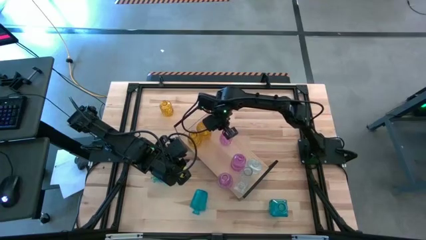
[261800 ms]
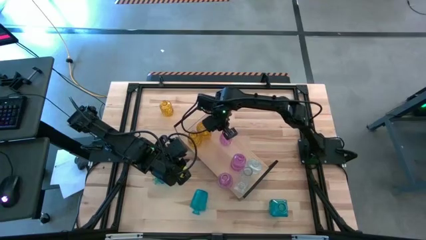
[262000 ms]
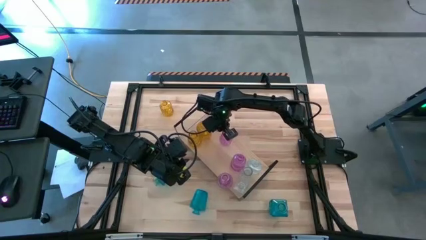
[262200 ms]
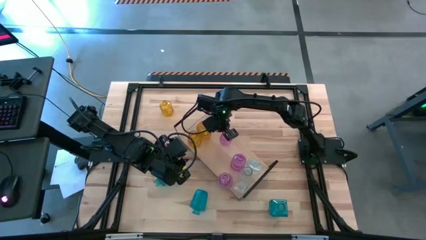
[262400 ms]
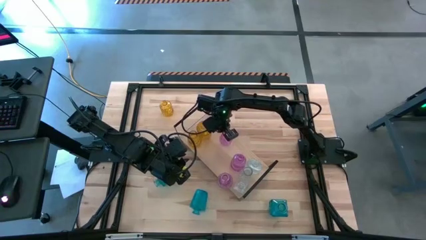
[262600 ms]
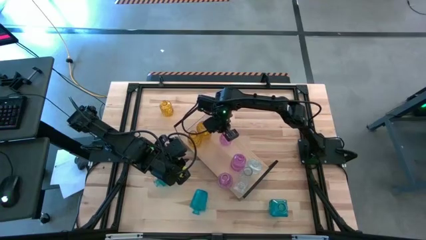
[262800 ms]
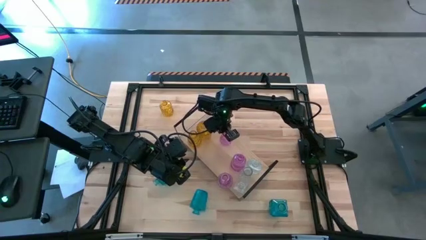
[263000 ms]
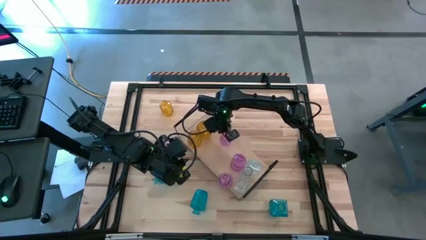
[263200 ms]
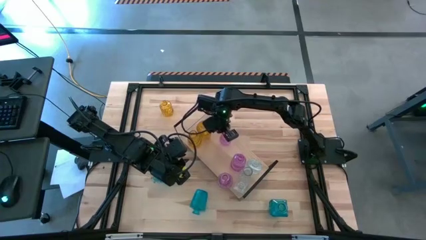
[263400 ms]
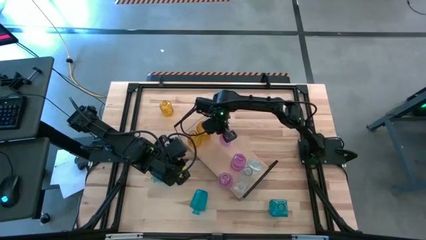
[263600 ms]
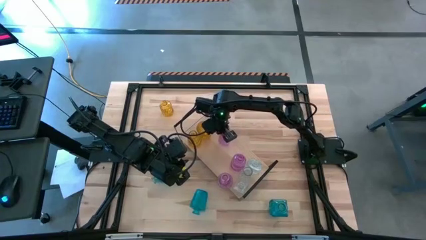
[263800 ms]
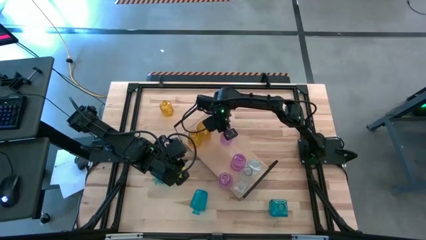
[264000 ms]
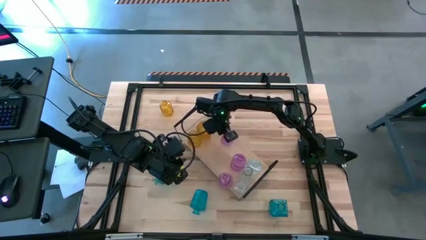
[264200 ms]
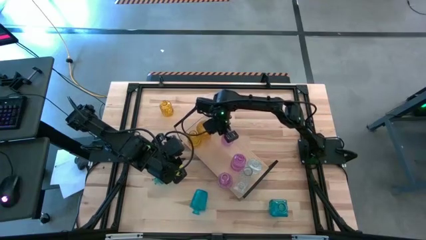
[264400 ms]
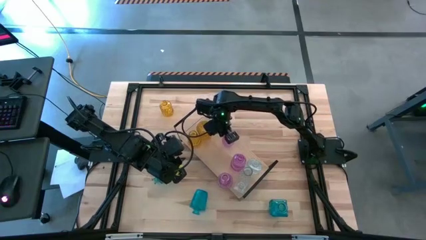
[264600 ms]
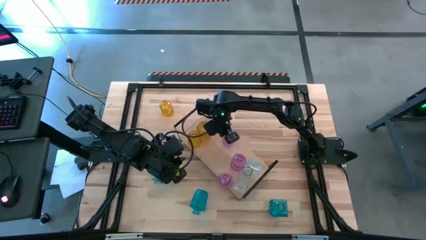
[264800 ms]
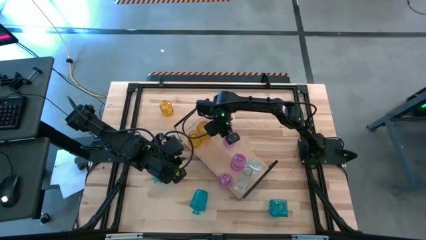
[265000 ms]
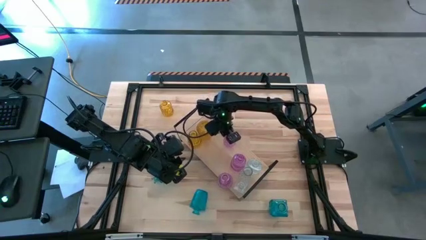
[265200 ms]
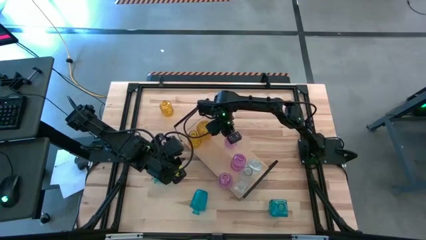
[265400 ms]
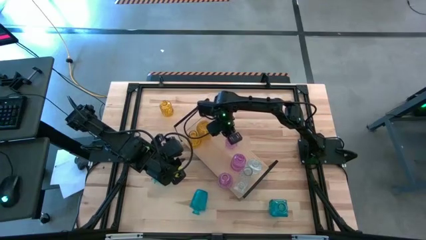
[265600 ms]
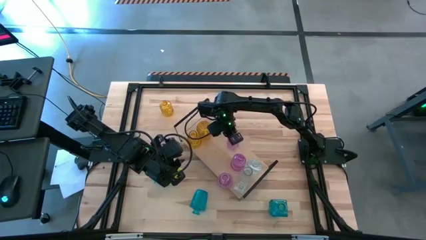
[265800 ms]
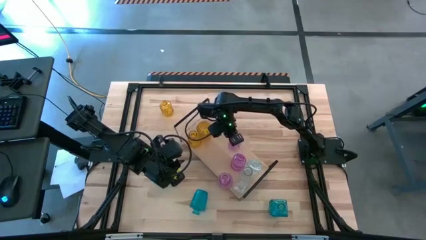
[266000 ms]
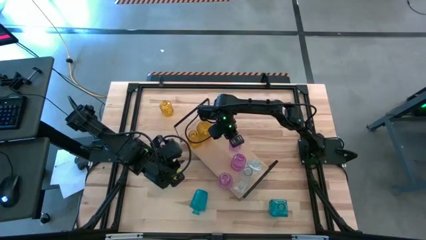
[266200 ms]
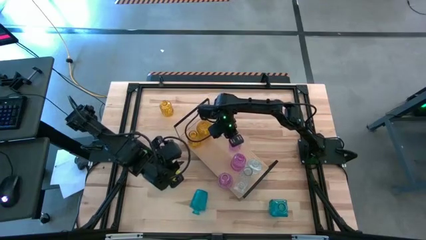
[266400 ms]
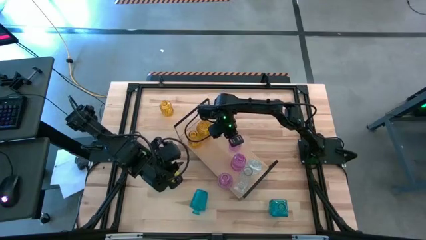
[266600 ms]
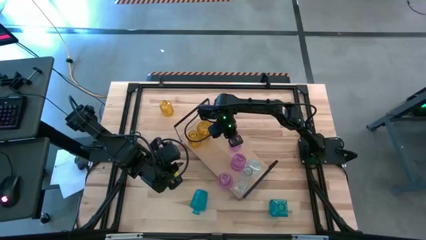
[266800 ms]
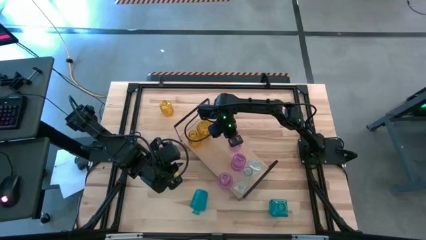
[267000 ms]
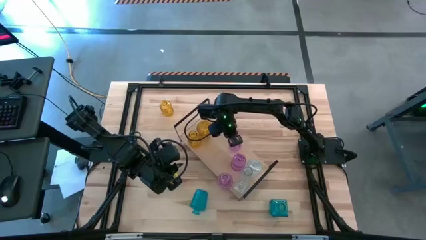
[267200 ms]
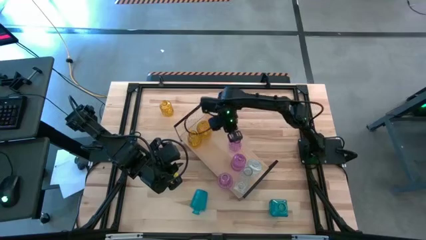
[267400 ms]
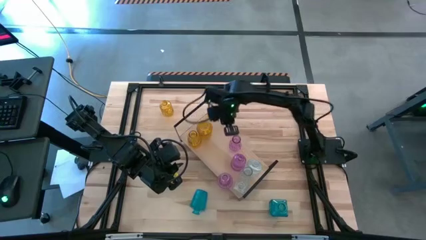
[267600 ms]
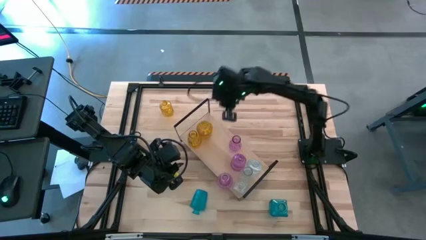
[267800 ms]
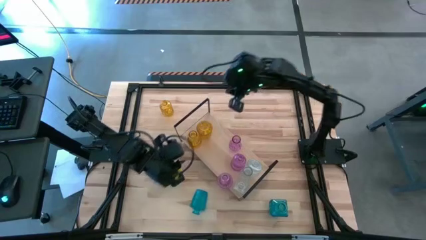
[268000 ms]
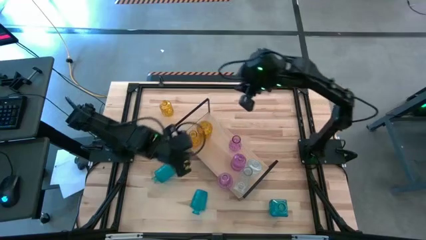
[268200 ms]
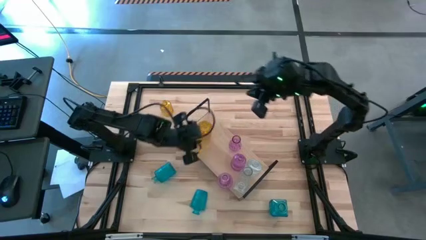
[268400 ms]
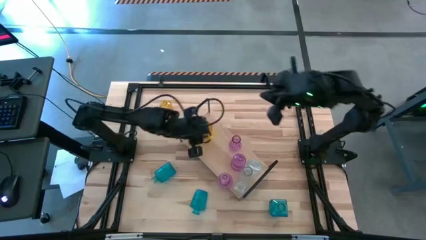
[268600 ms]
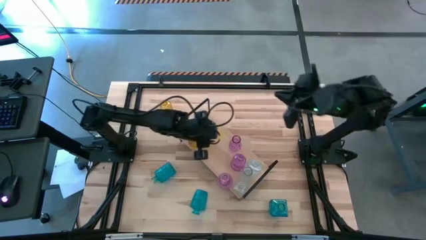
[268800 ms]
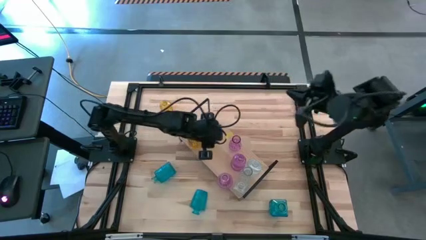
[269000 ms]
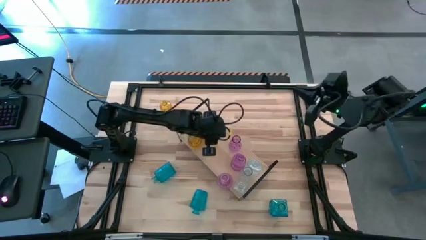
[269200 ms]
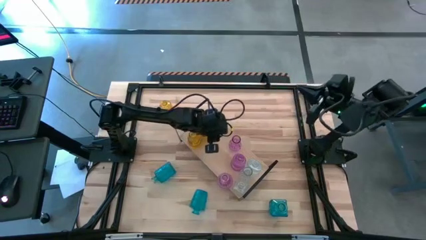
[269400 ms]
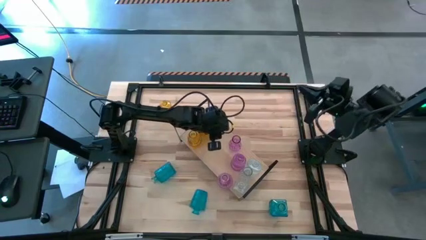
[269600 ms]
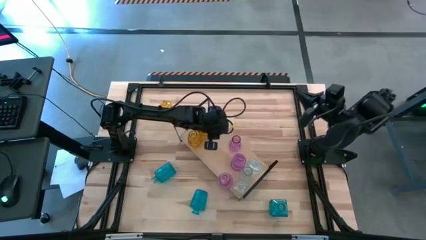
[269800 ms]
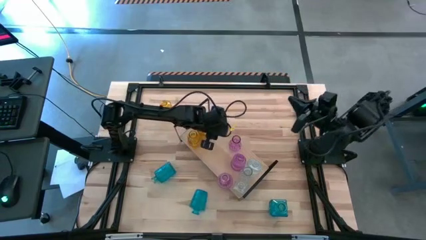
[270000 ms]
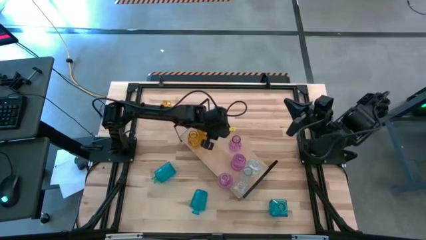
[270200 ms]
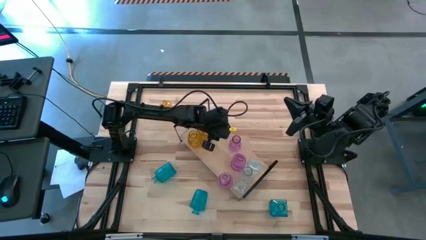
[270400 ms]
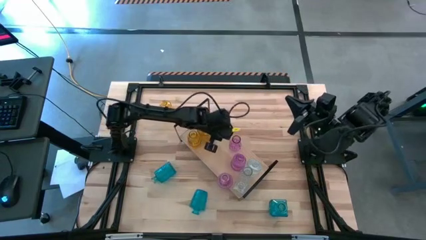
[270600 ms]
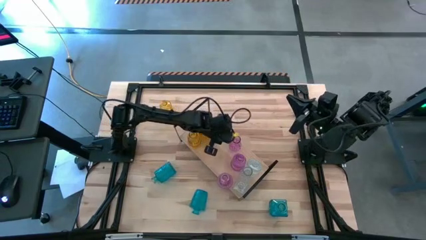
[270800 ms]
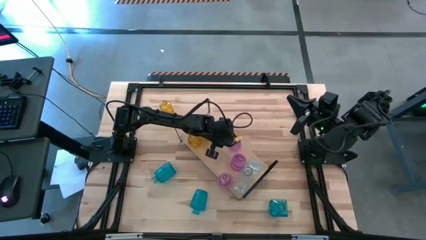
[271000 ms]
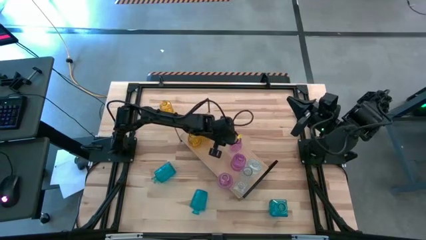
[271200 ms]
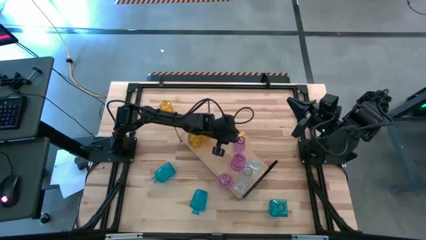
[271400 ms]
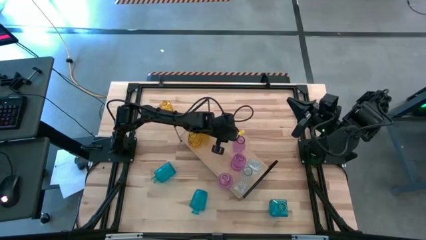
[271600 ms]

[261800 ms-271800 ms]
Task: sort vases onto shelf
Adjust the pink crystal vases
